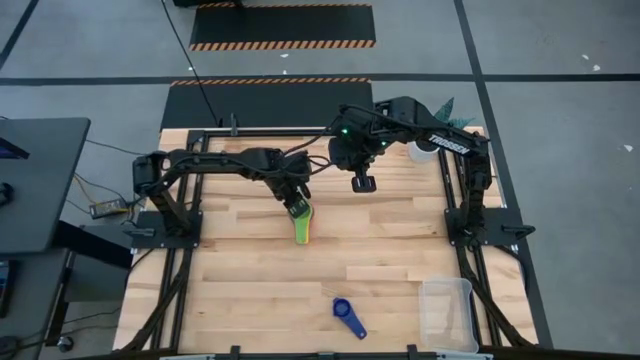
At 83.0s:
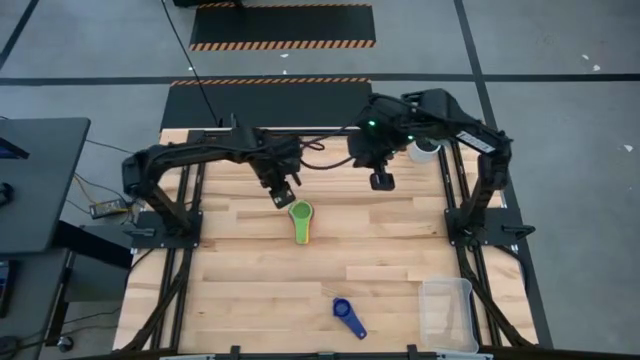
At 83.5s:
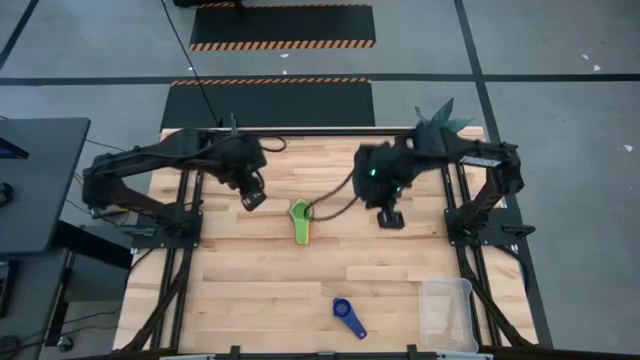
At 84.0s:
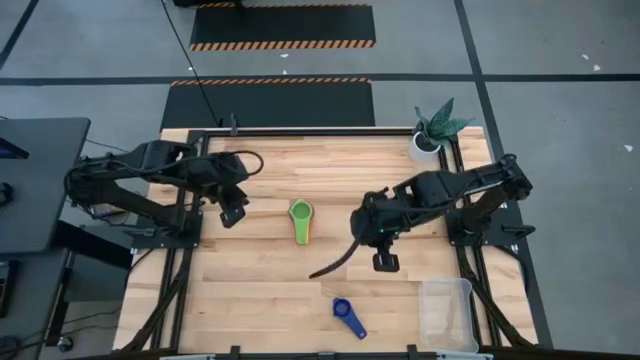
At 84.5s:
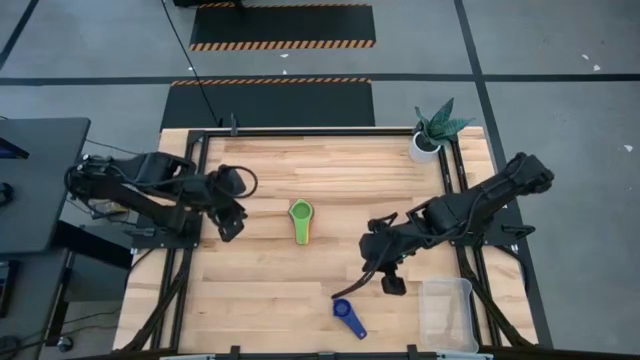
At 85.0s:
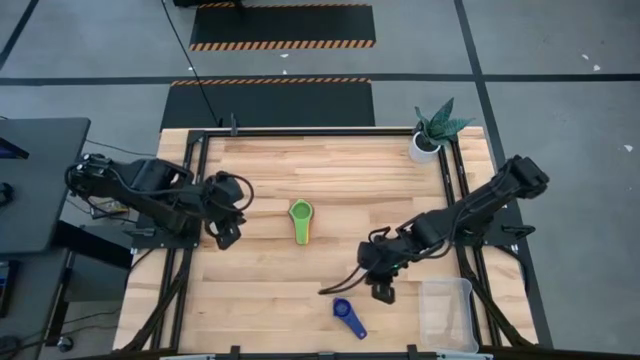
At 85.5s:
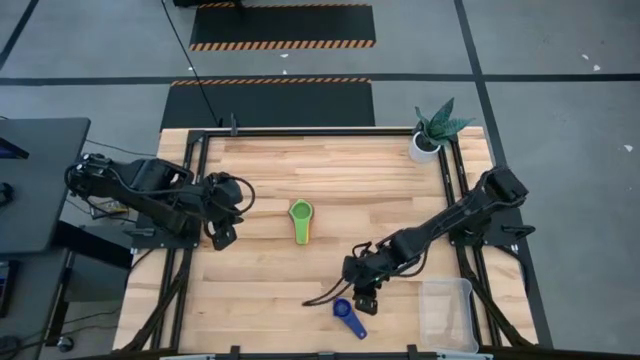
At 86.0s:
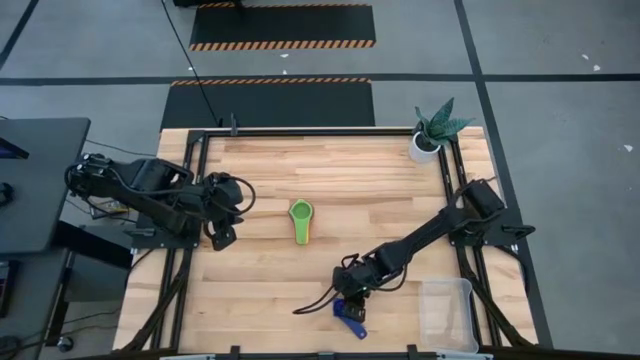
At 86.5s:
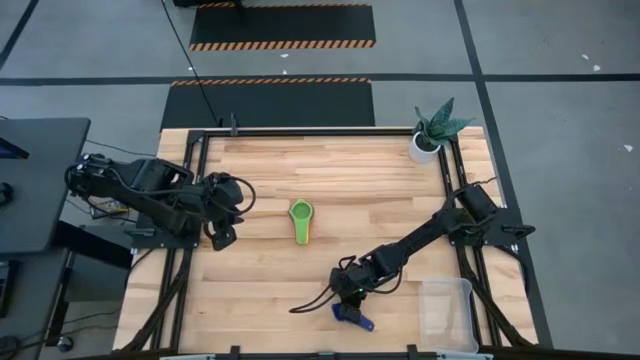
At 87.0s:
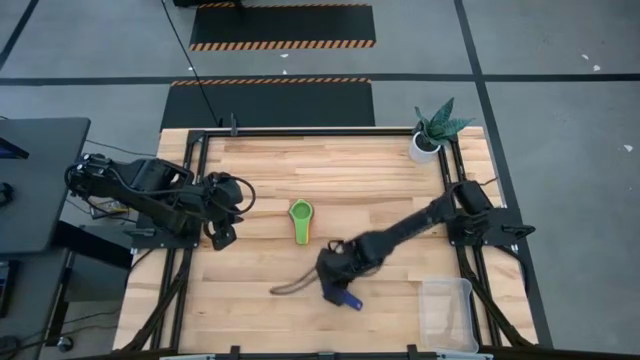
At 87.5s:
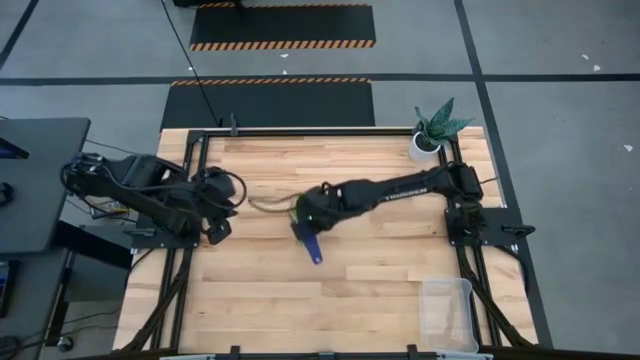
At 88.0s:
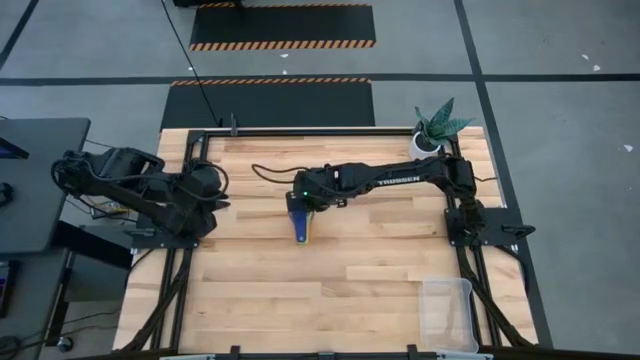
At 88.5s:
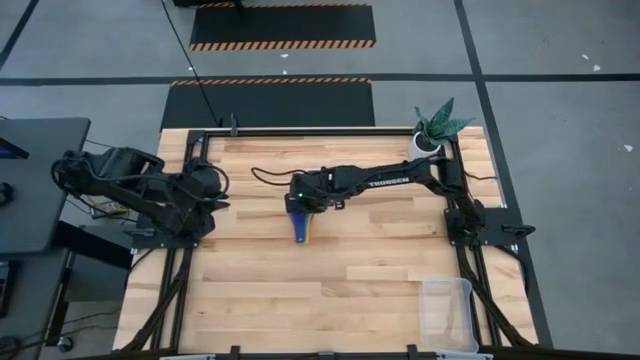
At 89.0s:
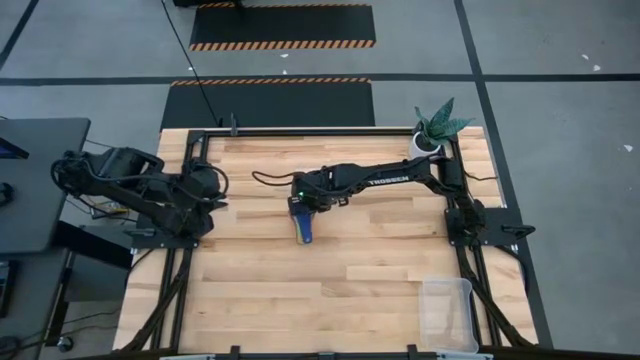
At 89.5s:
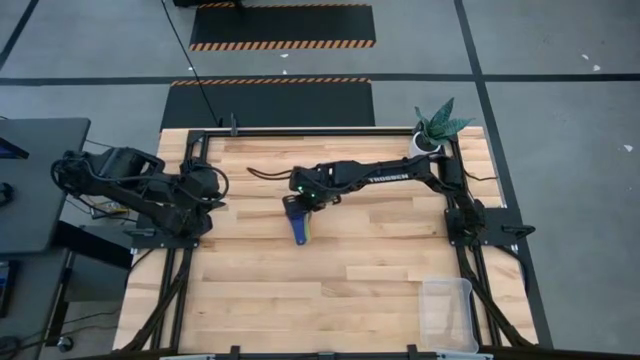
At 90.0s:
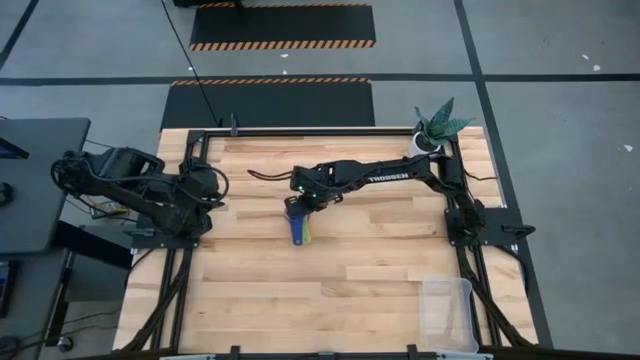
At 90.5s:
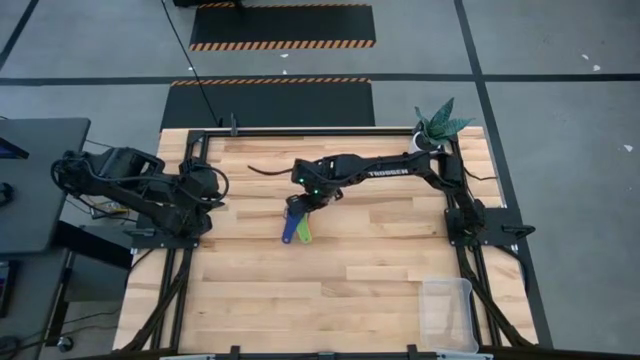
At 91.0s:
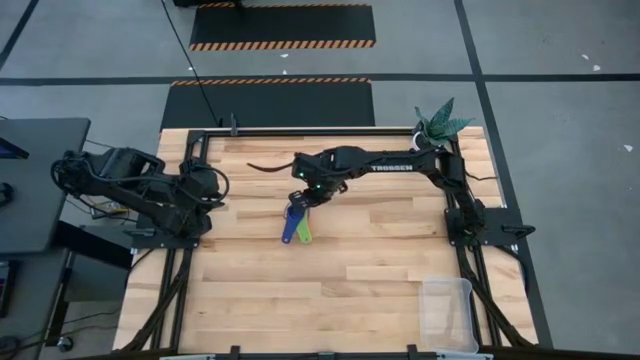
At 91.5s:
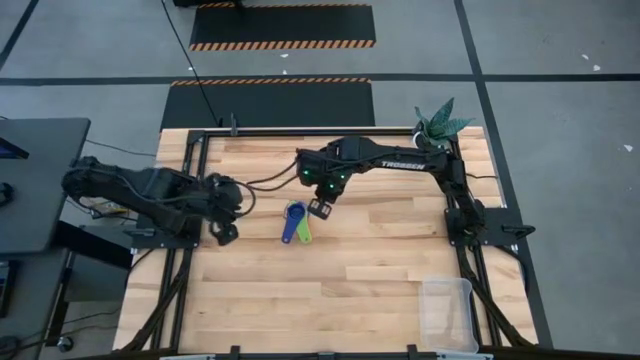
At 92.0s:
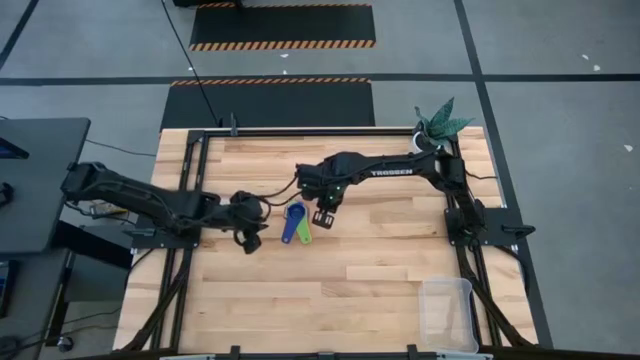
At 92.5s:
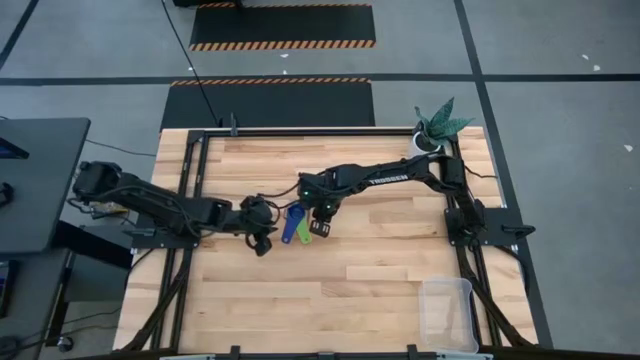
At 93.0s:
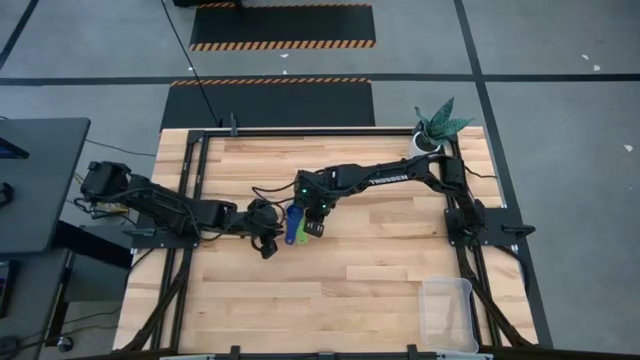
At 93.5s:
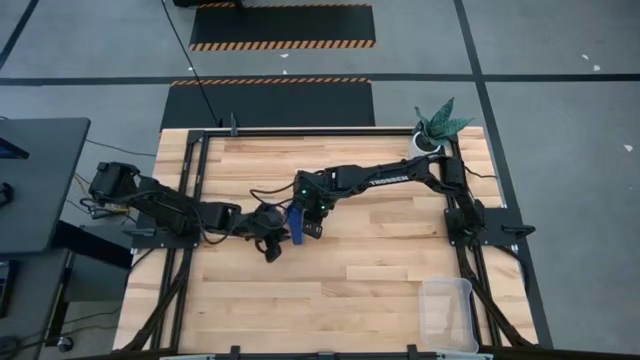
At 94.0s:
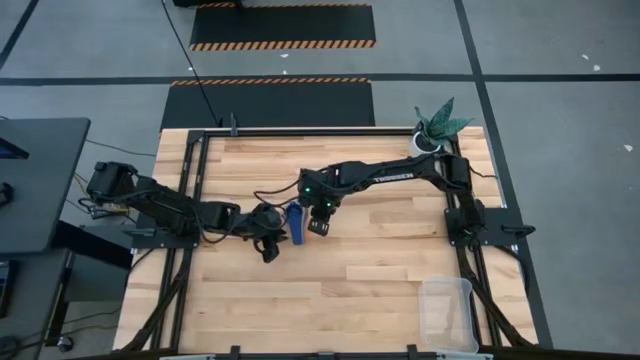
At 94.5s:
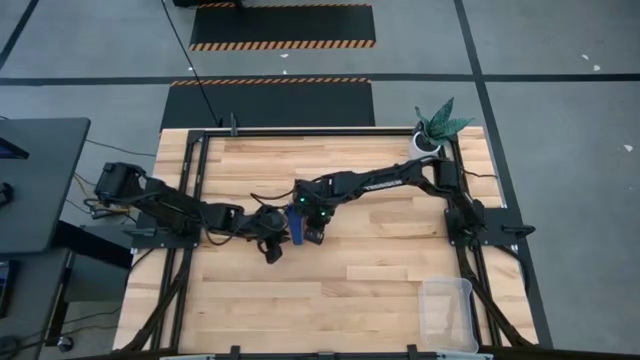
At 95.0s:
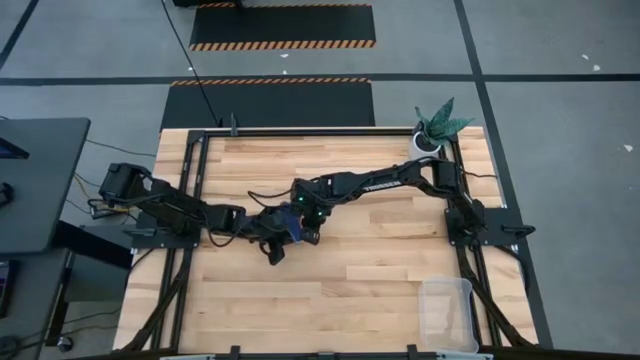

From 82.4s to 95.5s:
Task: Nest measuring cups in basket
Stack the dark blue measuring cup on top of the green measuring cup

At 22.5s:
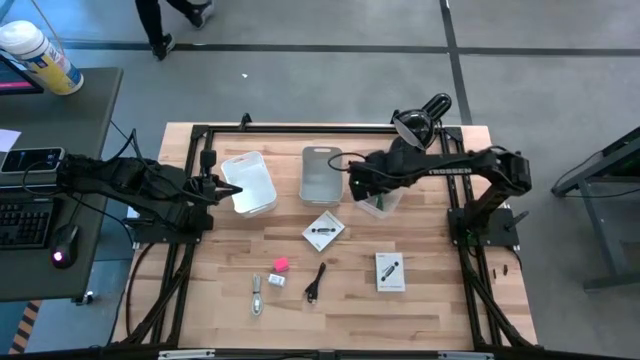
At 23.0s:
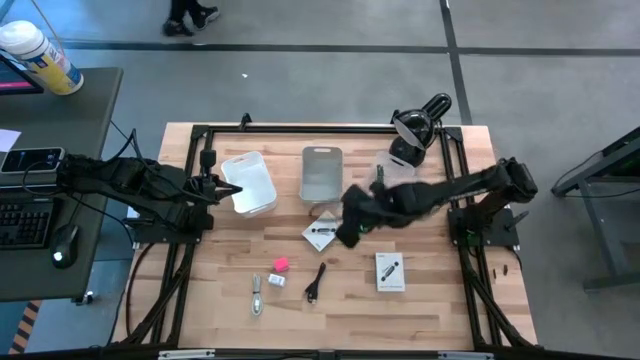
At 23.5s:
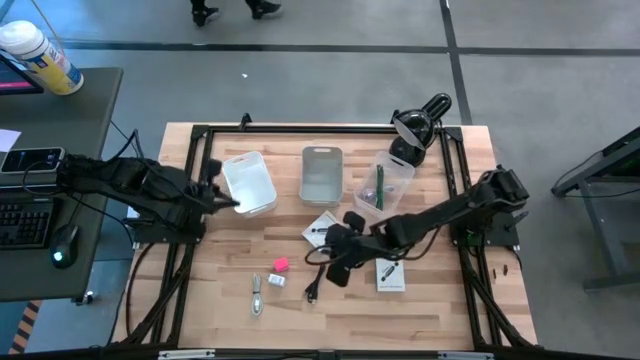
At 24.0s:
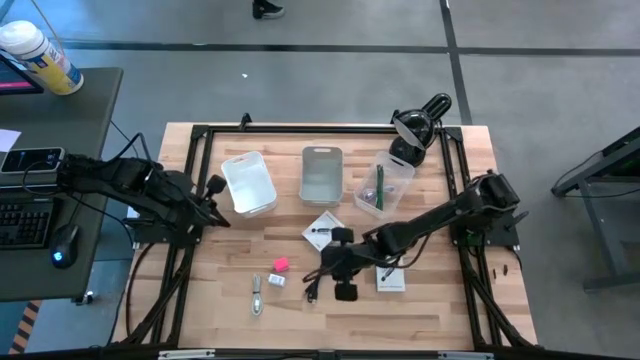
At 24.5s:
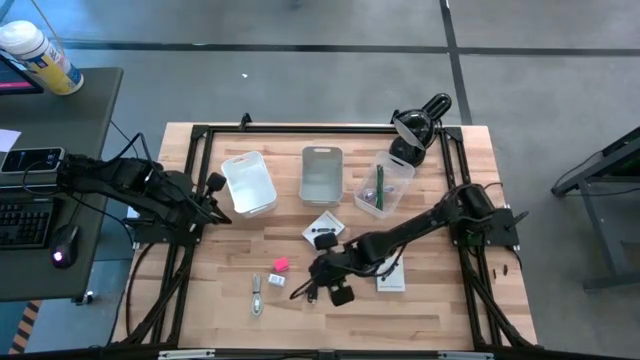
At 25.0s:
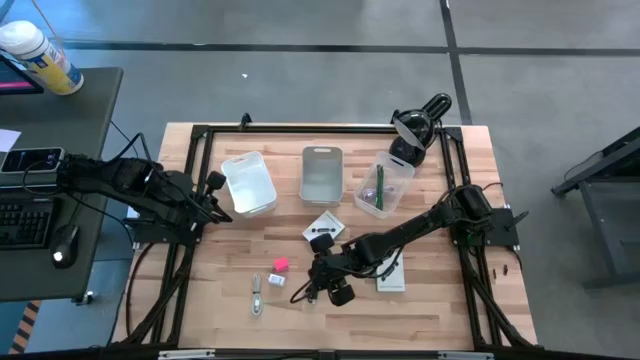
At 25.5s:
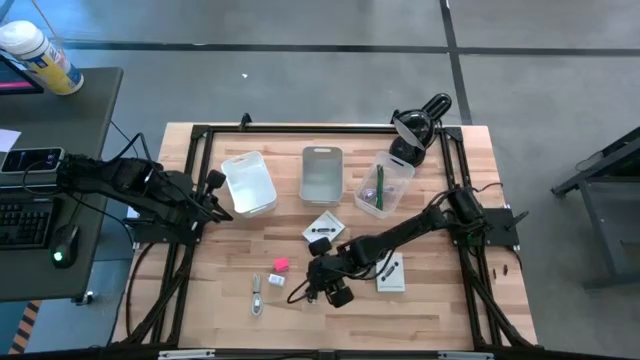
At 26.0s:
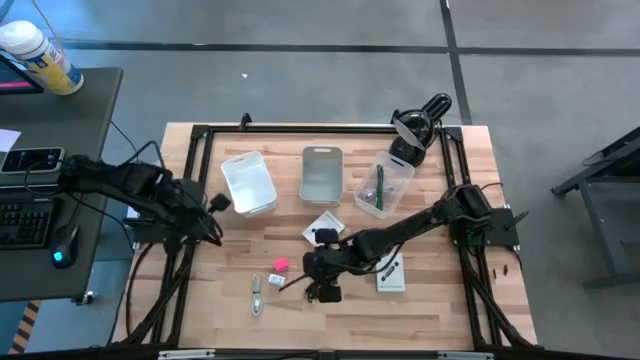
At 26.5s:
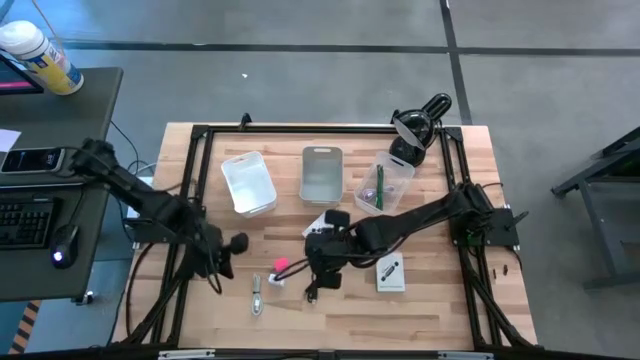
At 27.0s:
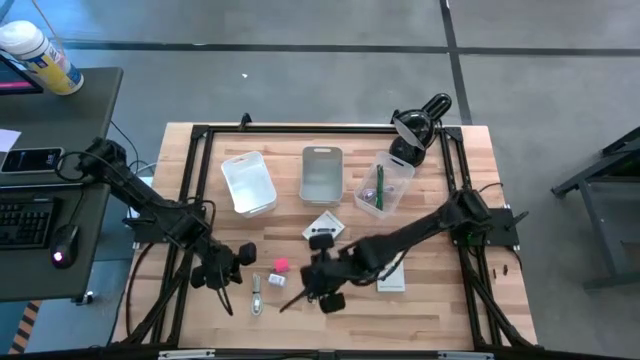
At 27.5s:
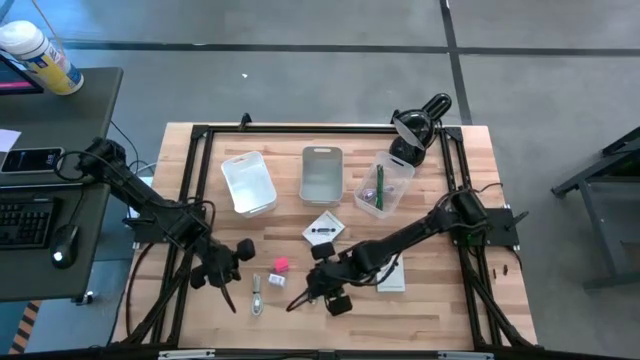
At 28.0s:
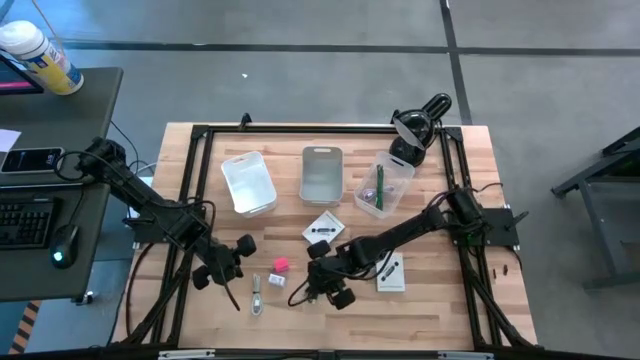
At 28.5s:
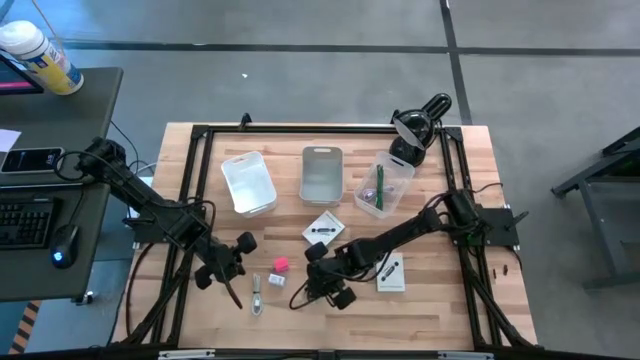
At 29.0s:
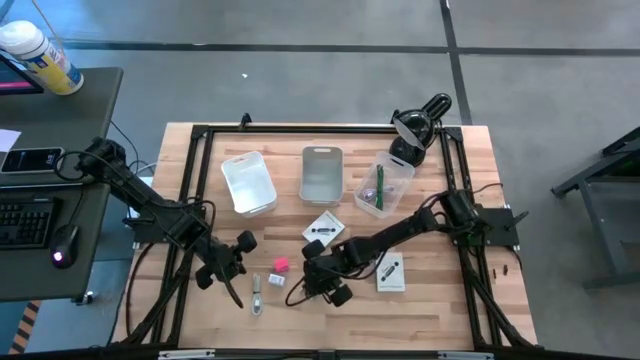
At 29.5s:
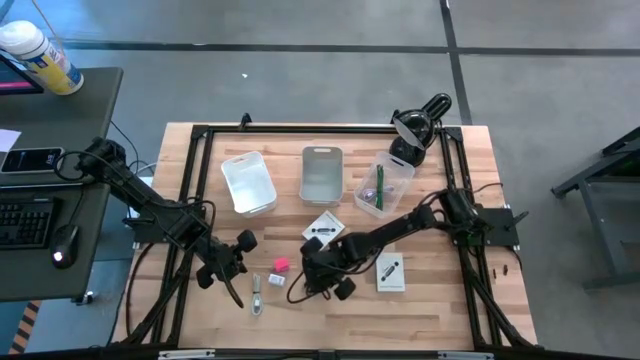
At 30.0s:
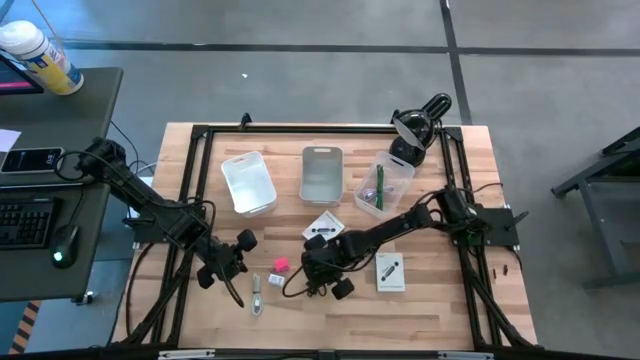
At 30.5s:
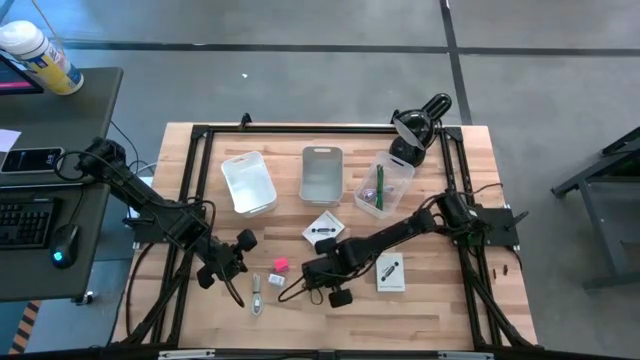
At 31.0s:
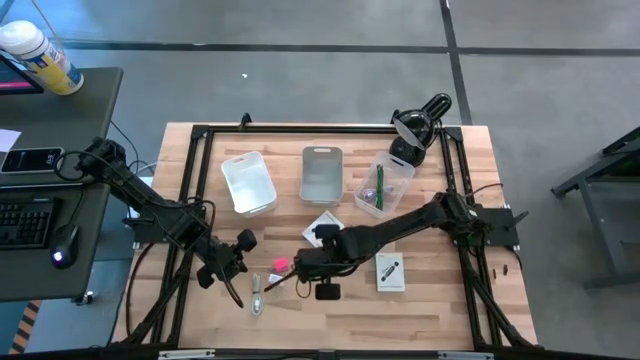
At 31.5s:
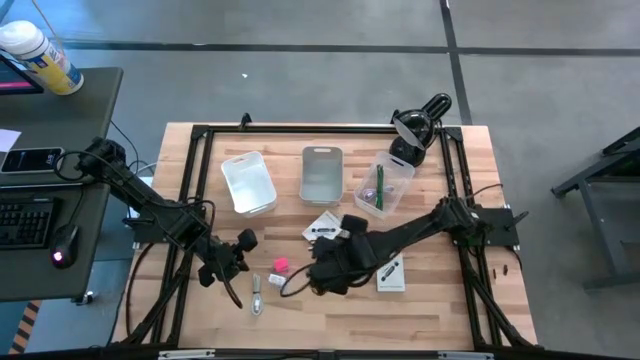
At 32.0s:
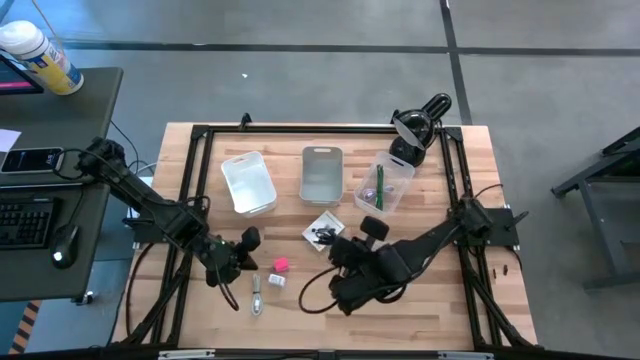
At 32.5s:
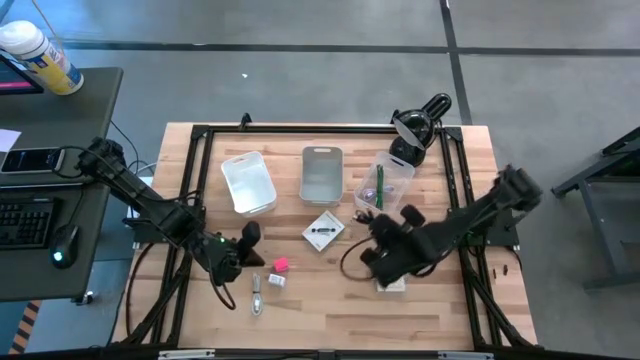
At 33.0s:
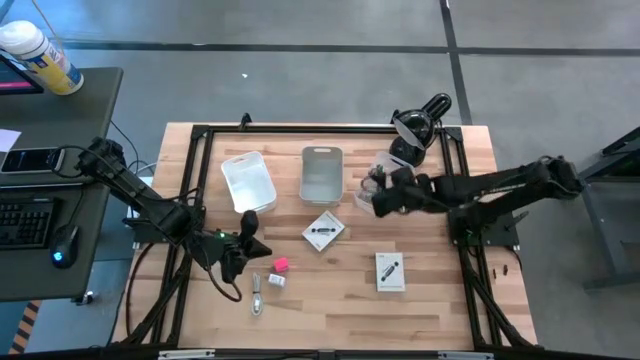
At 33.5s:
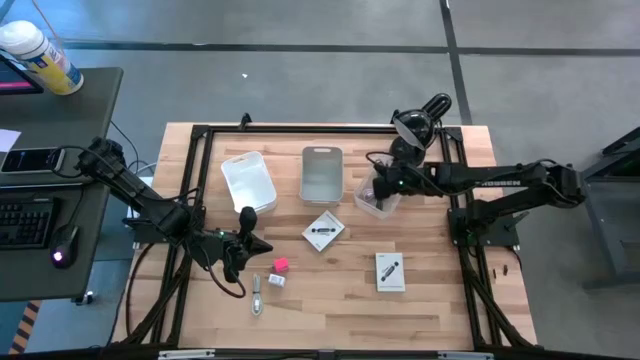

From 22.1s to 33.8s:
Task: Pick and place items into bin
Put the black charger cable into the transparent bin
